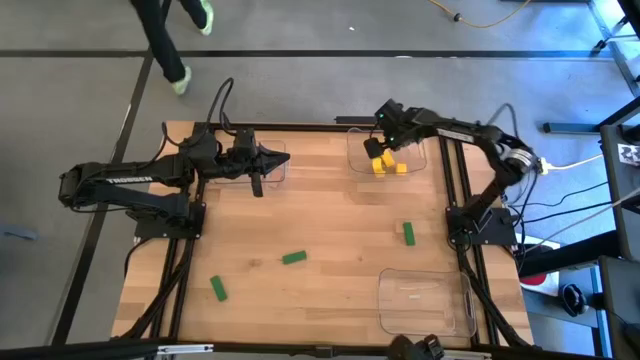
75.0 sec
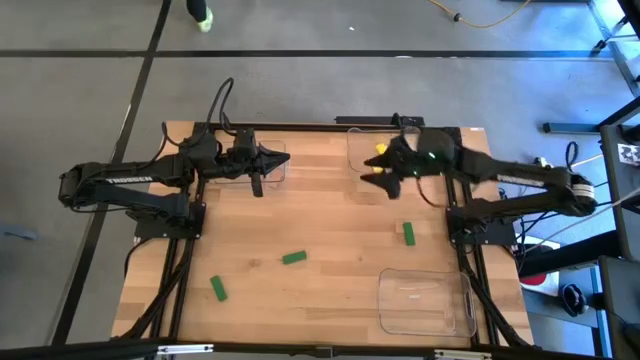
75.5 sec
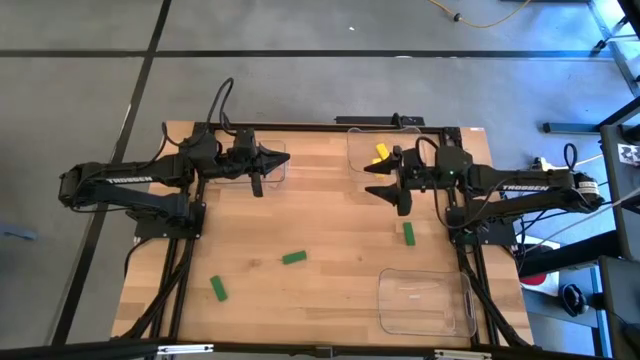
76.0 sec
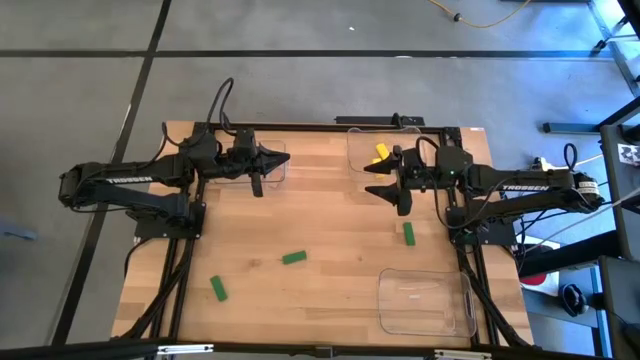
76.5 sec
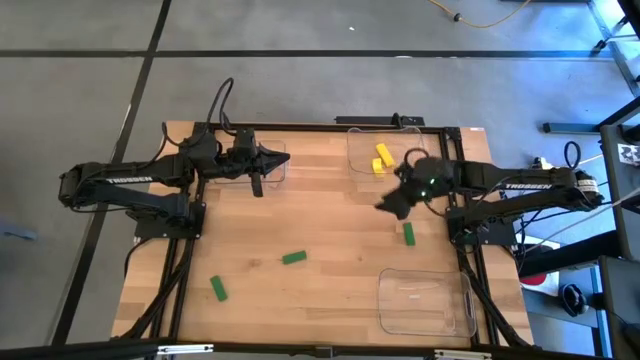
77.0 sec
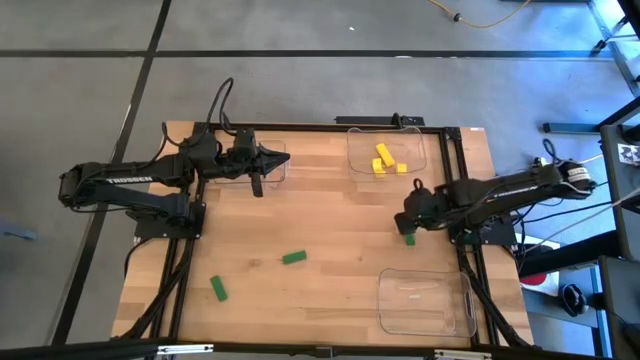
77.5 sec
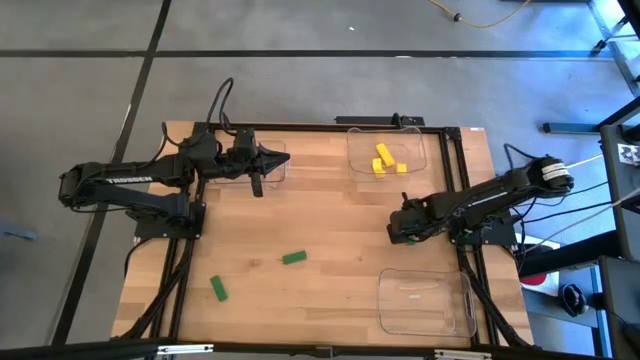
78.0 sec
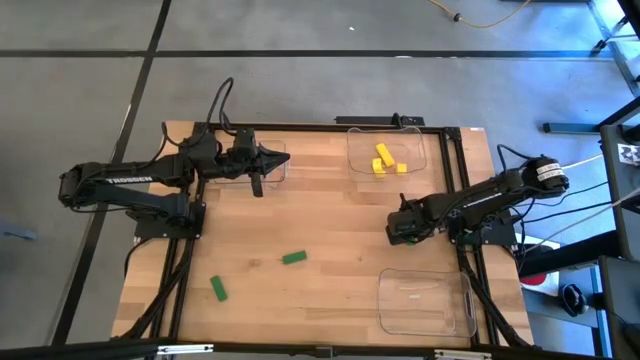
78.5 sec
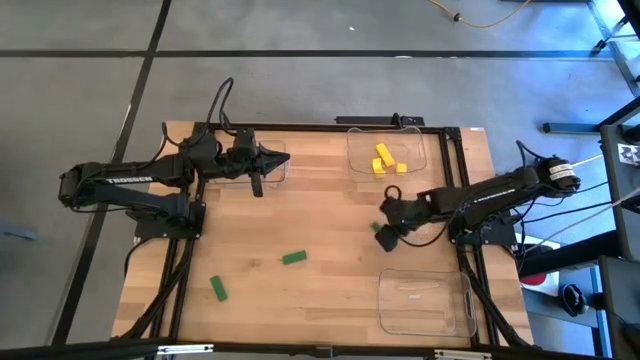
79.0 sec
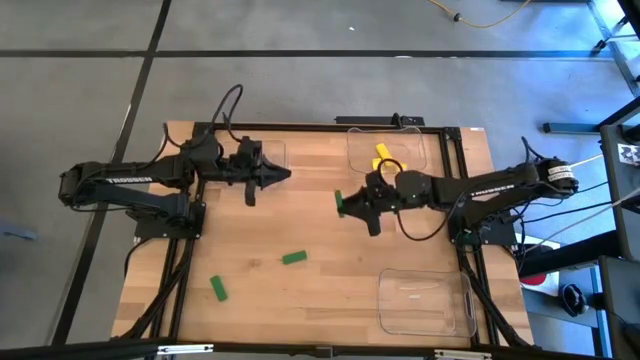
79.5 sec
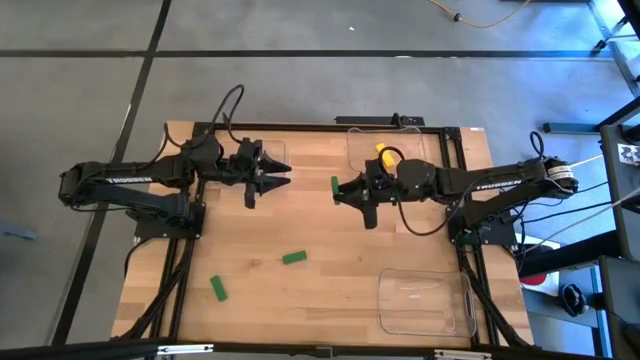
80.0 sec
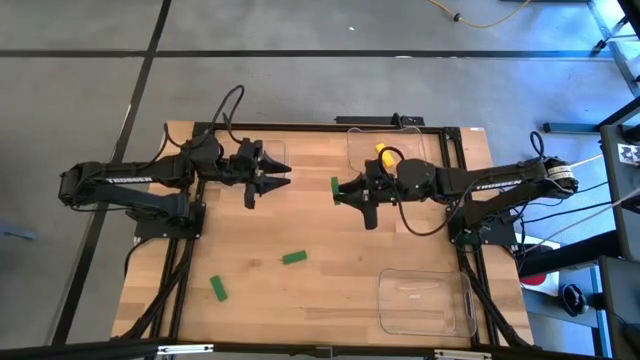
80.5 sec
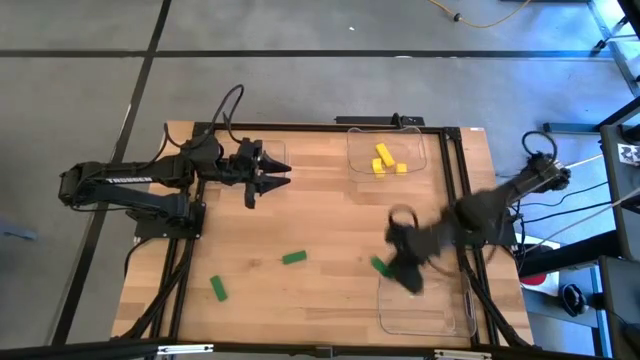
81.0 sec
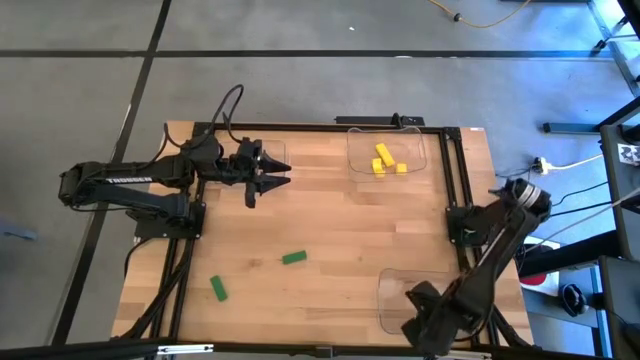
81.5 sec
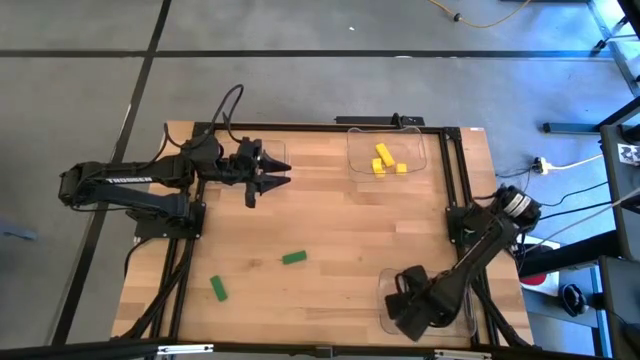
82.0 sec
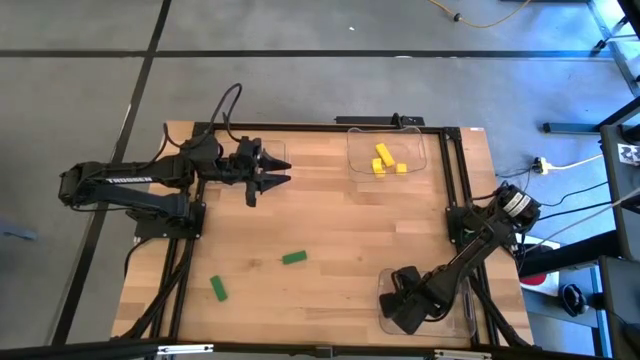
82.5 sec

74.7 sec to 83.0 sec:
Task: Sort & place blocks by color
Put the top green block into the bottom transparent bin

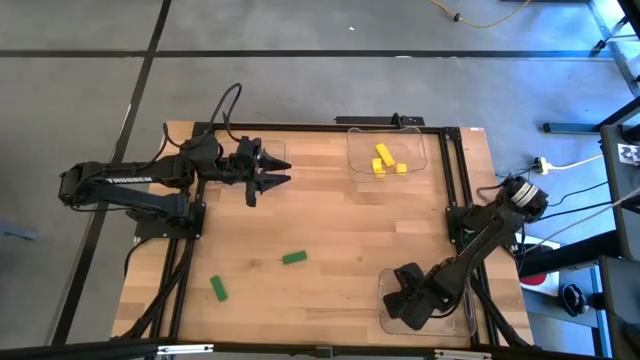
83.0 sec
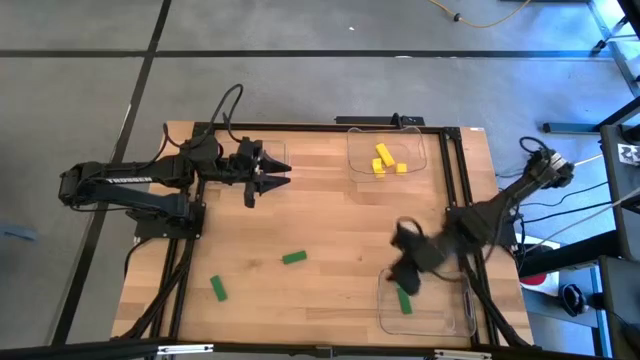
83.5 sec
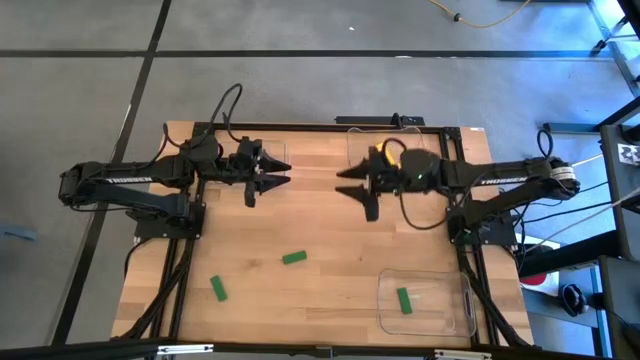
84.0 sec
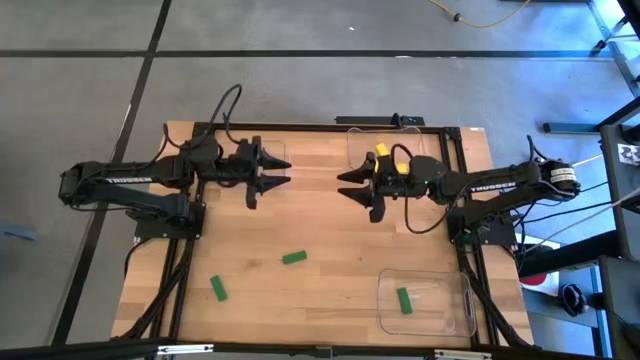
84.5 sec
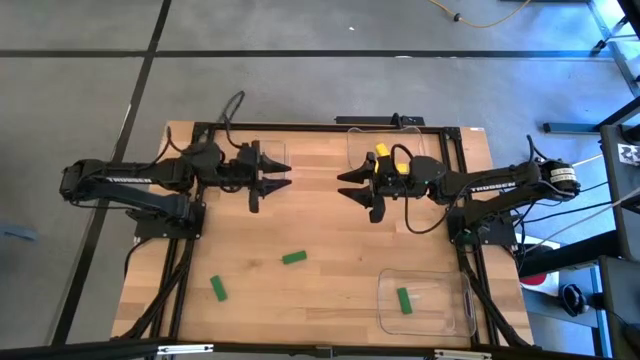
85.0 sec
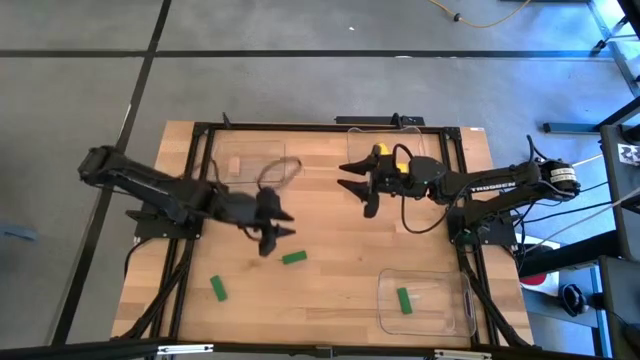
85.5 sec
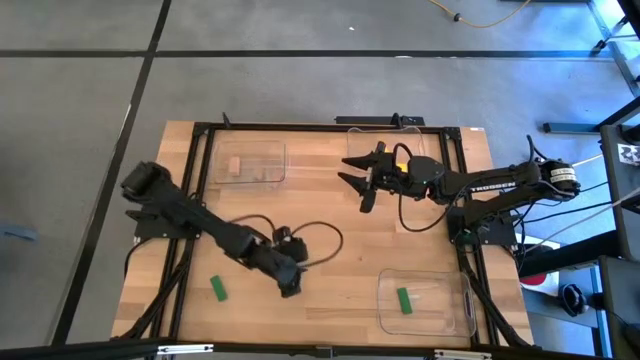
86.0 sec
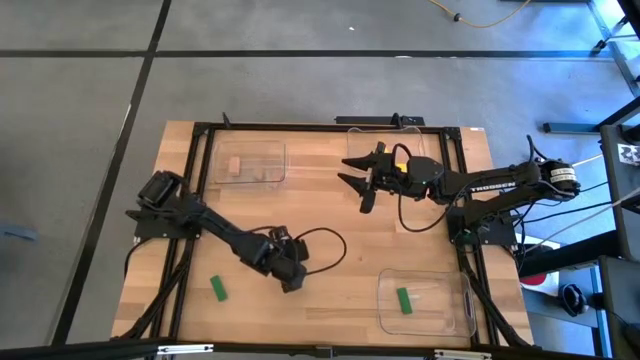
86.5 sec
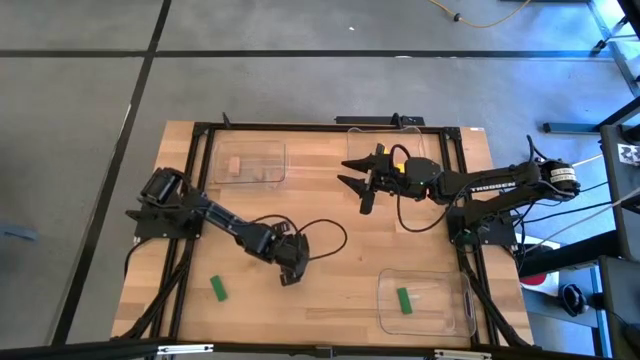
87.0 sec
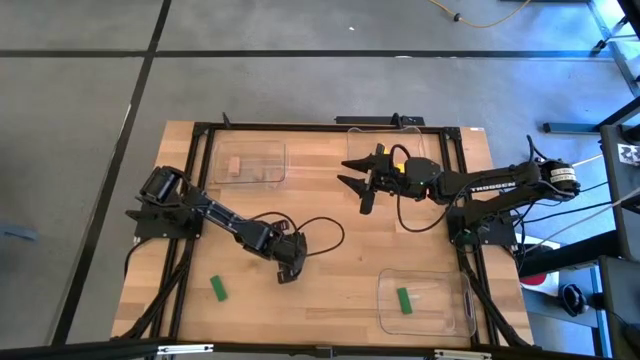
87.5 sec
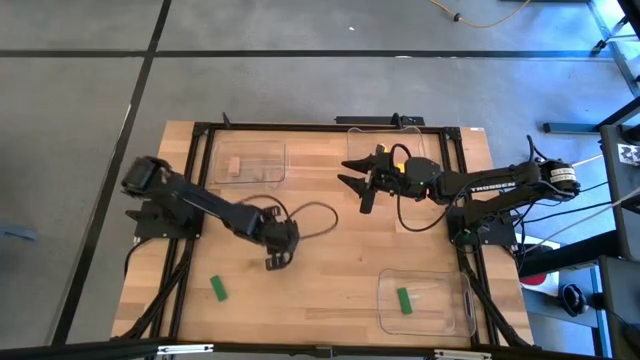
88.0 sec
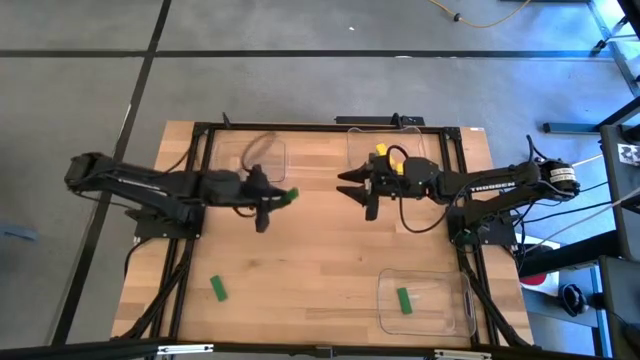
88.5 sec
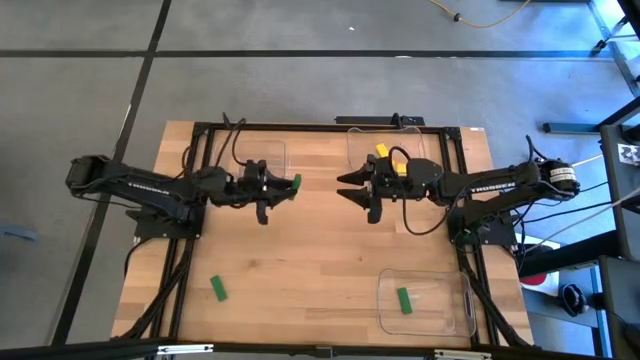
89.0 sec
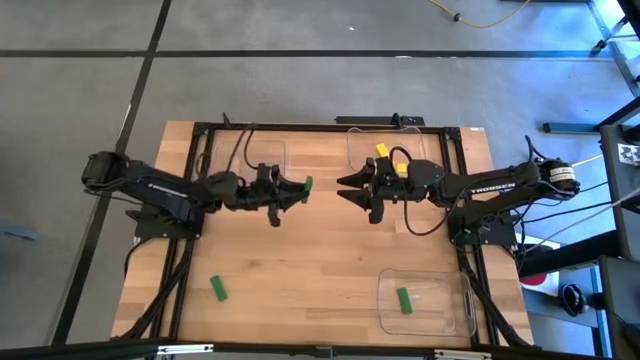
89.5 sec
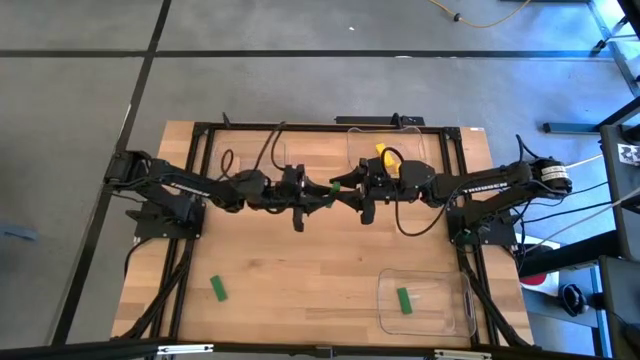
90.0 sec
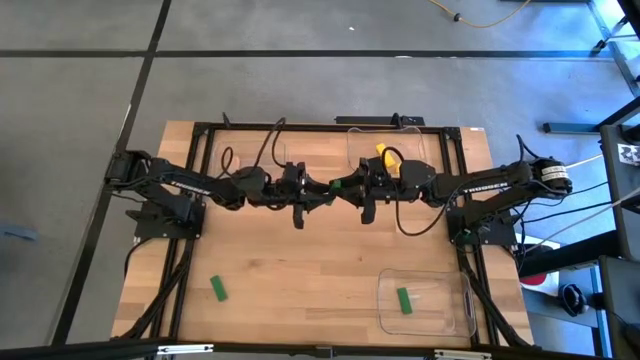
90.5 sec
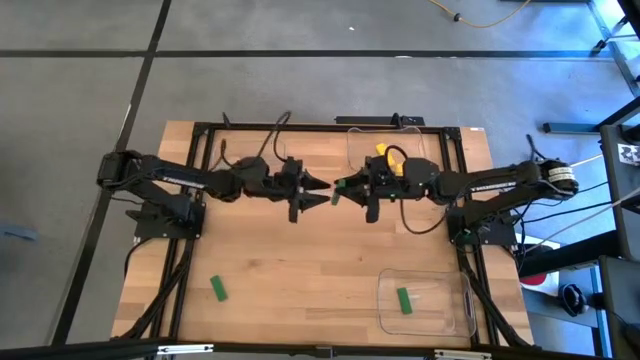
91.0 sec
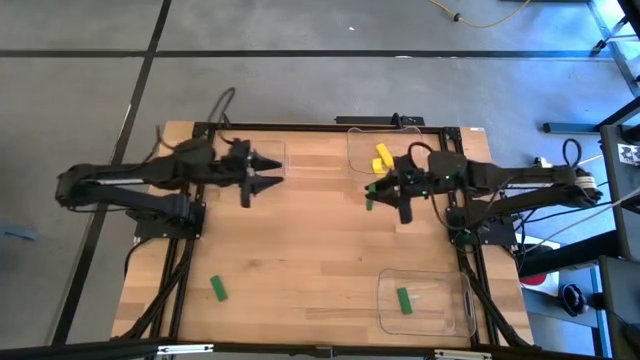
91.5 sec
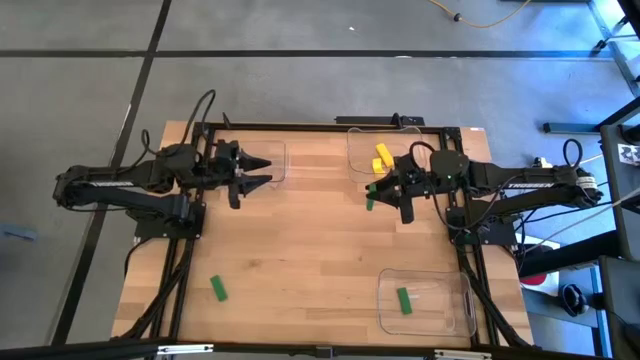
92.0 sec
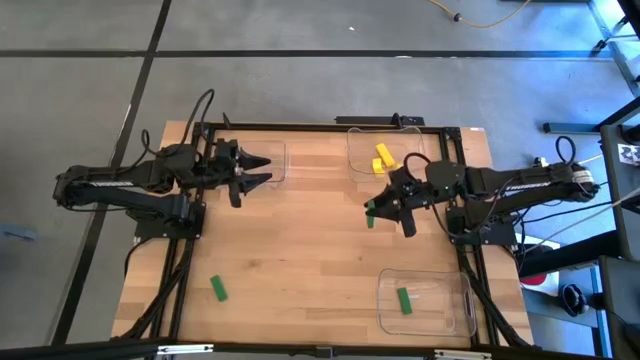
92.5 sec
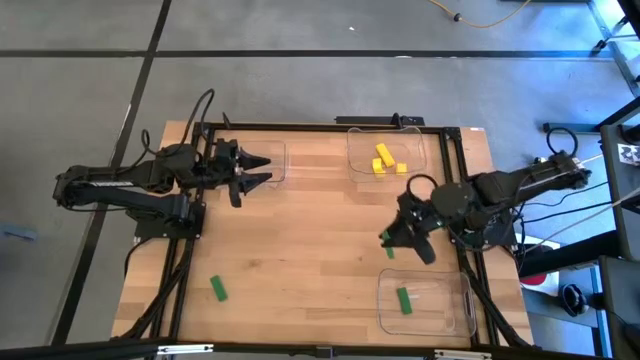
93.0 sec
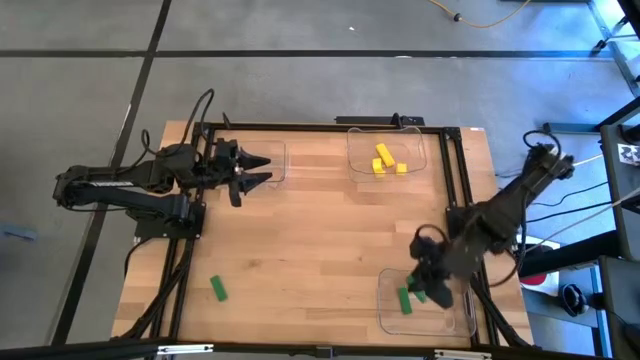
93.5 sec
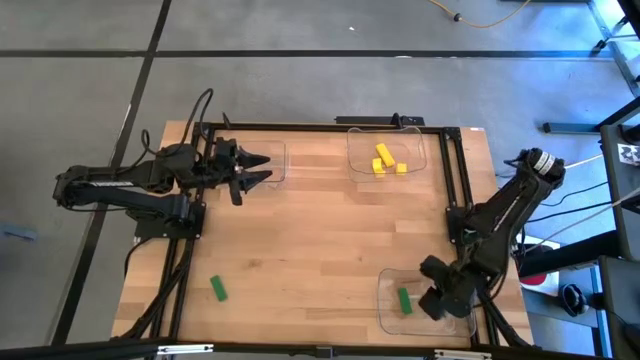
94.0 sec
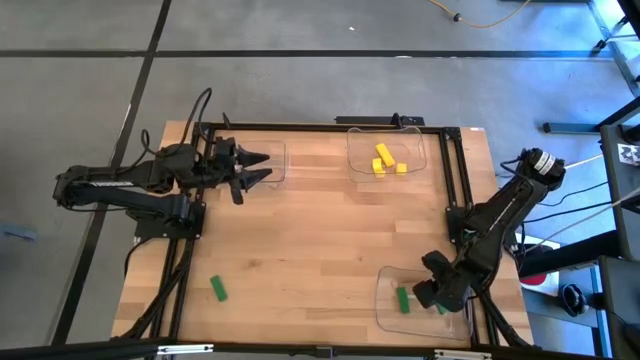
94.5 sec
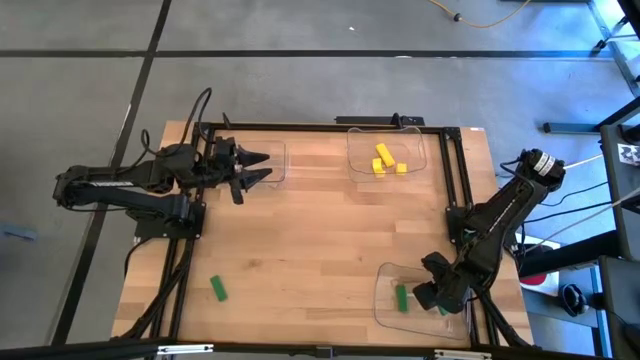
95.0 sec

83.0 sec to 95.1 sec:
Put the top green block into the bottom transparent bin

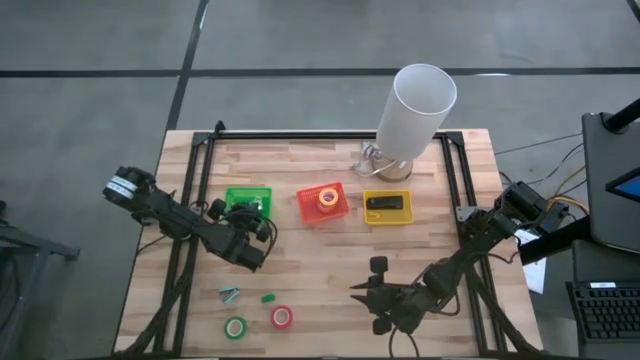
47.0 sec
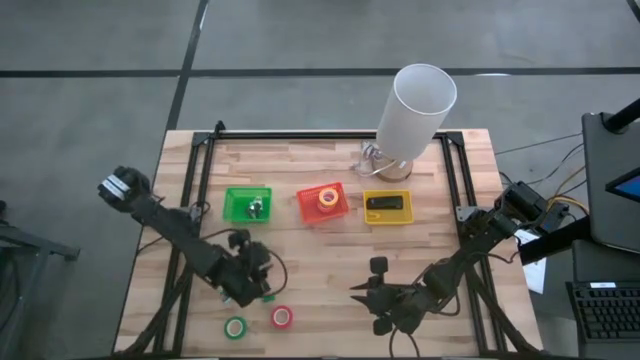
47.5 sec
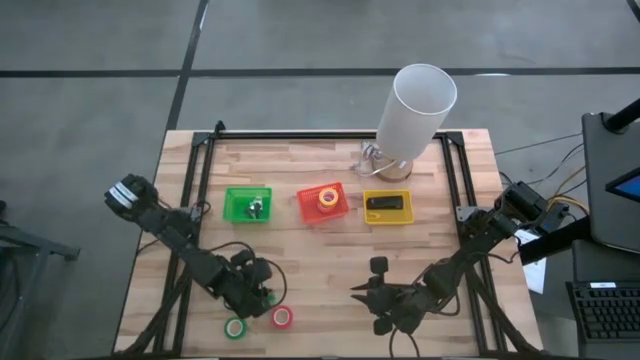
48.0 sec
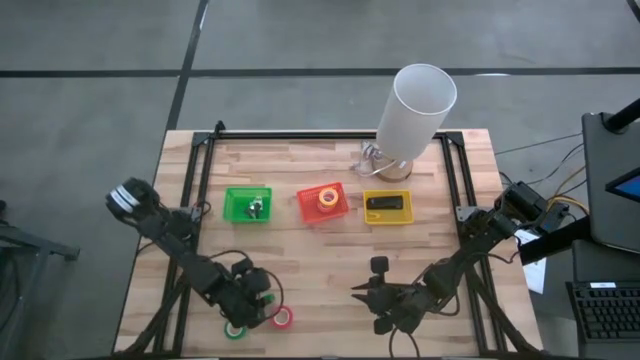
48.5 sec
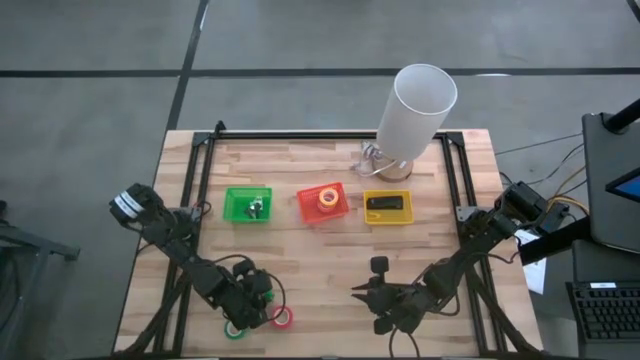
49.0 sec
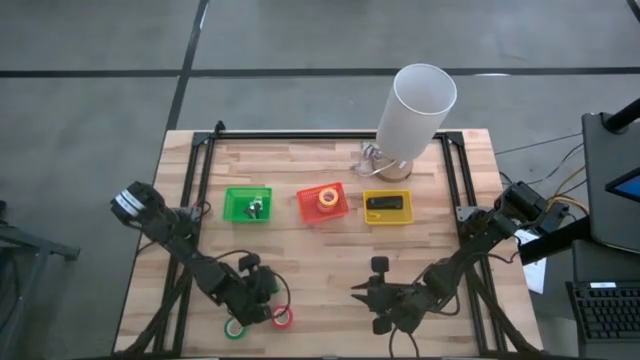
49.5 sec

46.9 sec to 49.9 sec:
Task: Pick and place Stapler, Stapler remover, tape
Put the green stapler into the yellow basket
